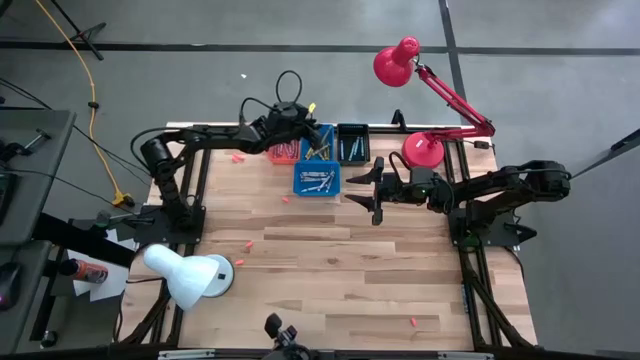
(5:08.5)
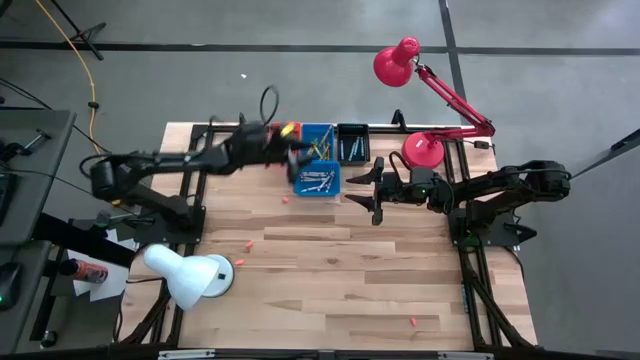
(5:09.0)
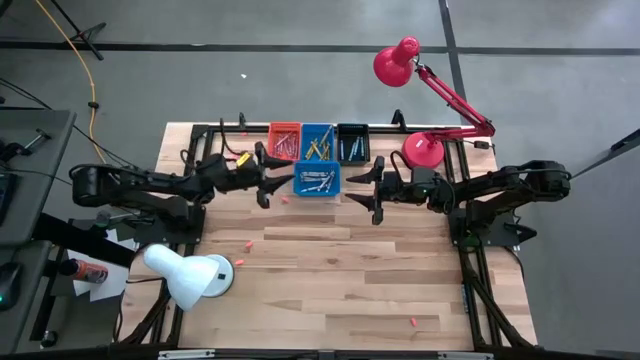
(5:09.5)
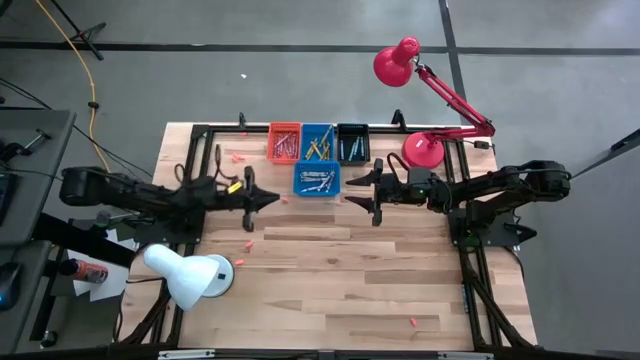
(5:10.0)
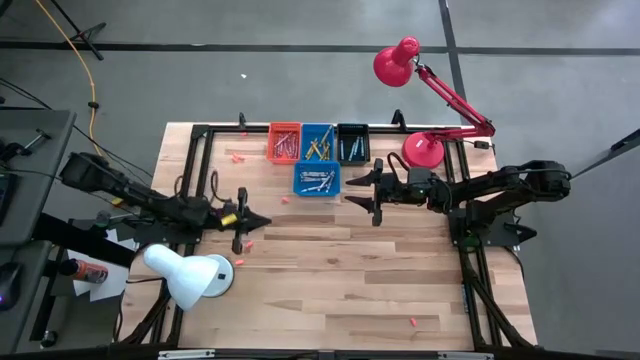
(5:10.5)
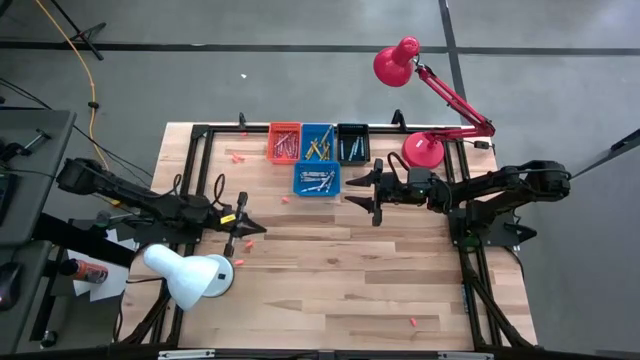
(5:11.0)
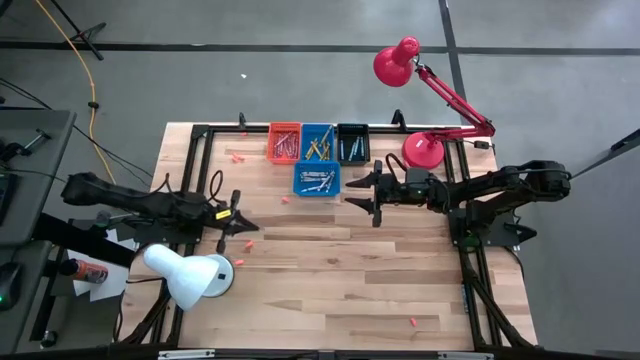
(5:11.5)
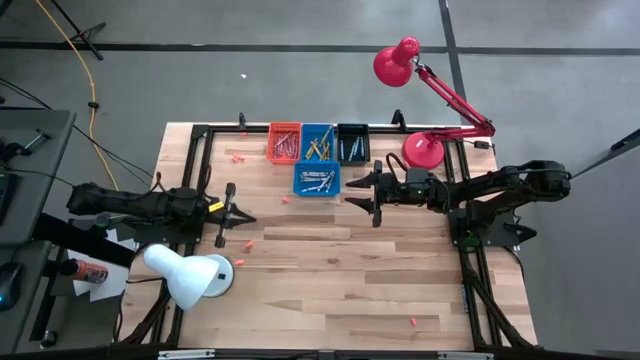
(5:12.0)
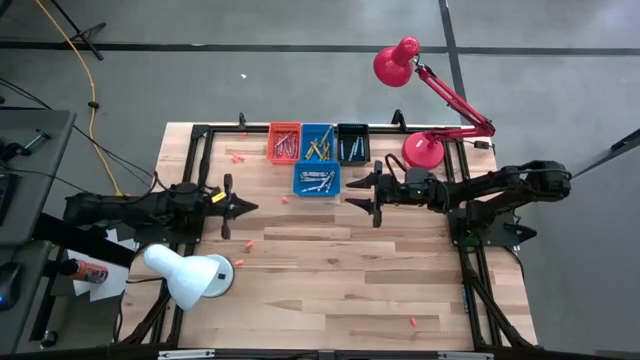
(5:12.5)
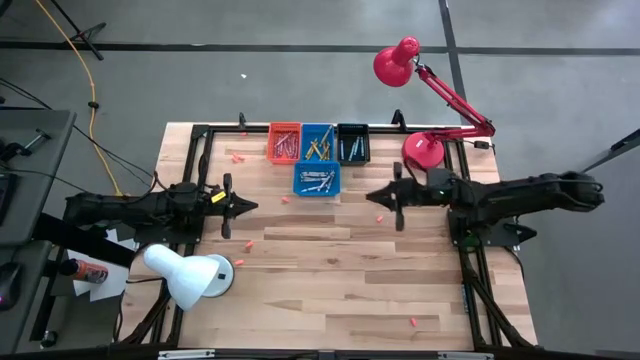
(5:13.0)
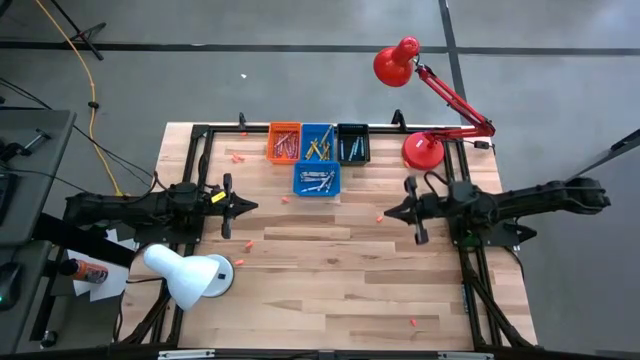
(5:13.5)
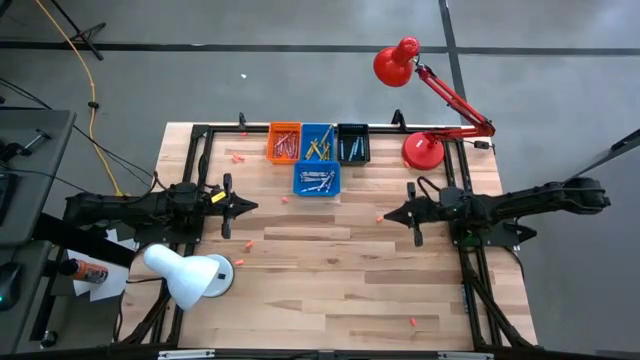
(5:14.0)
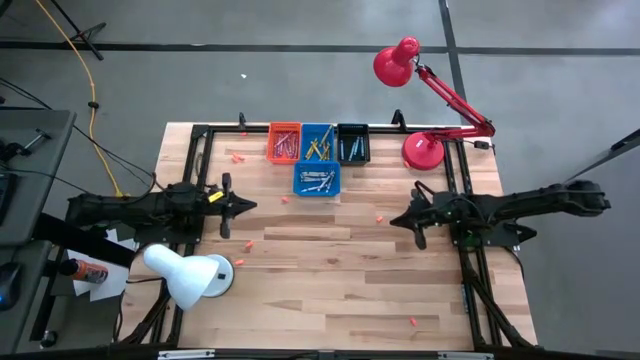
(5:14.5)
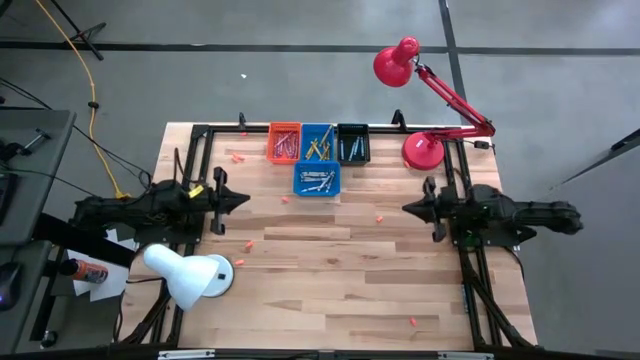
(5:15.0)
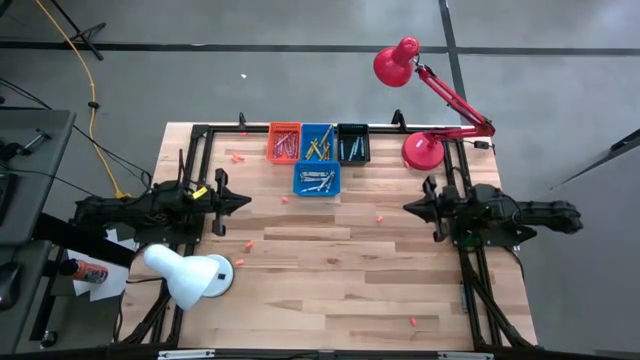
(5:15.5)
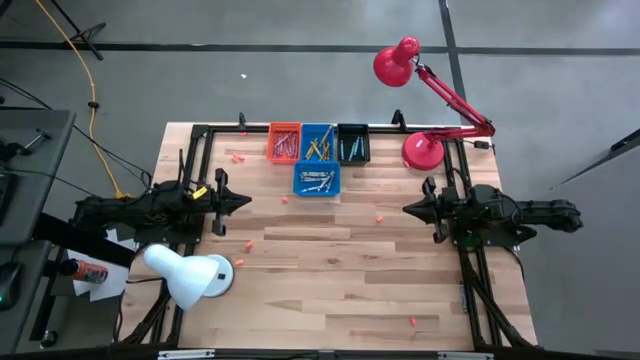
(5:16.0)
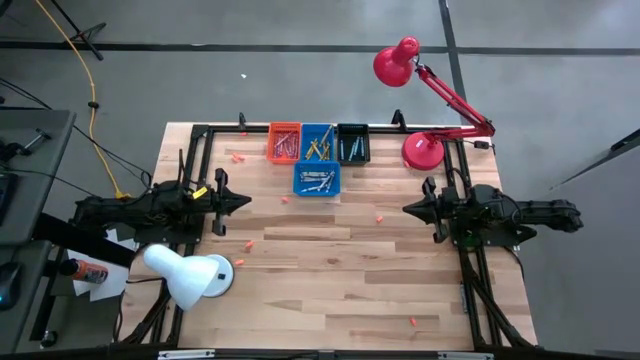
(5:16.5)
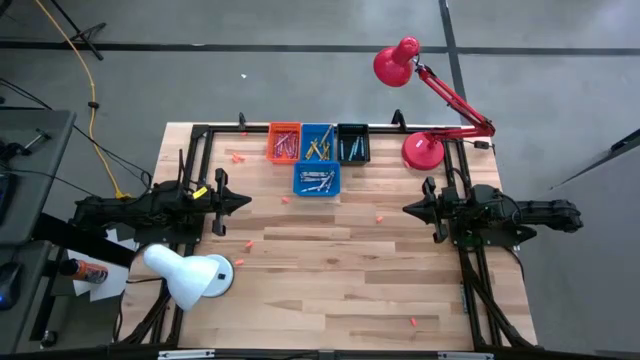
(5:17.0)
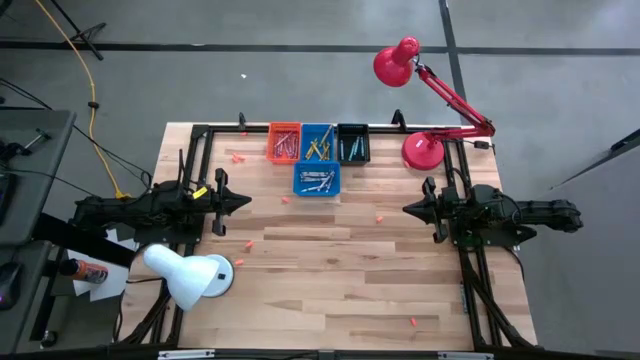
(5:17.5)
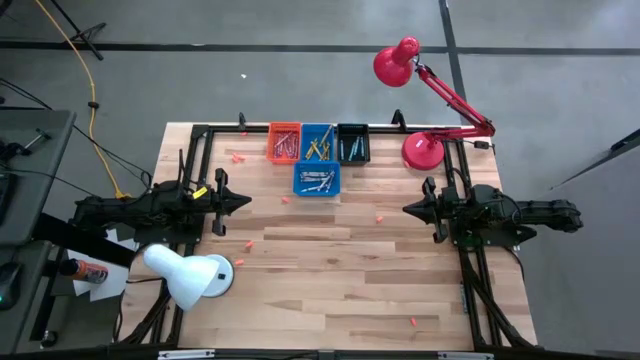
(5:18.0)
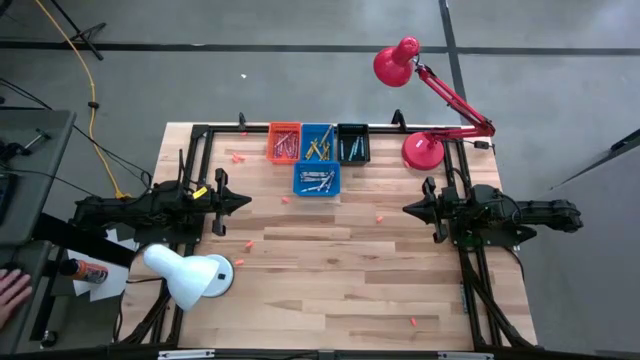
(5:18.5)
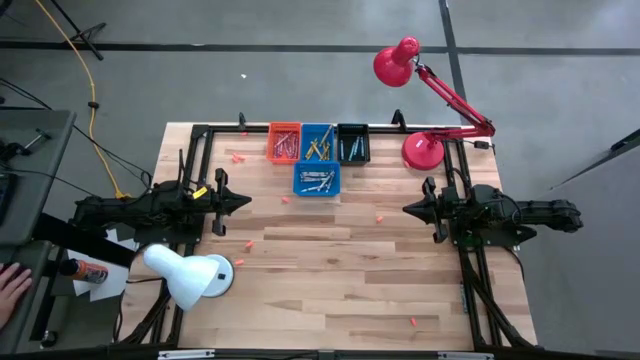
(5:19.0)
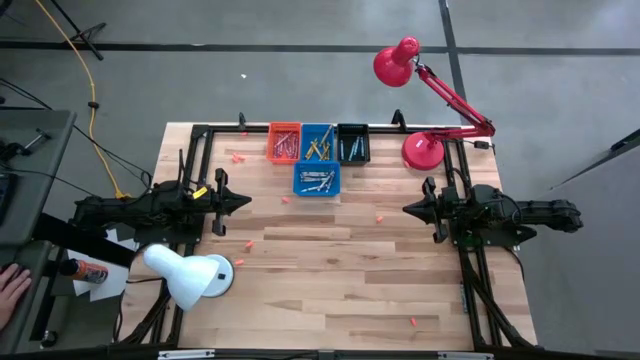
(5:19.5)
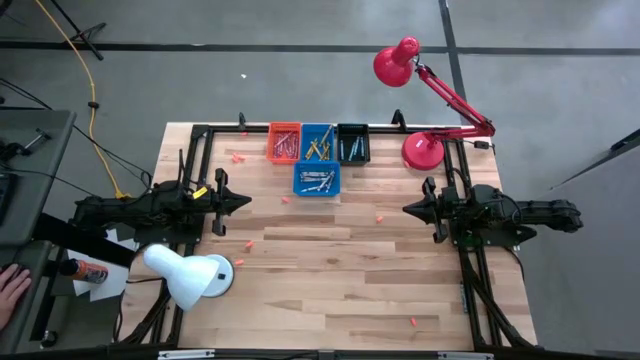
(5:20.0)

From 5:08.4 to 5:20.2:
Task: Sort crayons
Return to Home Position

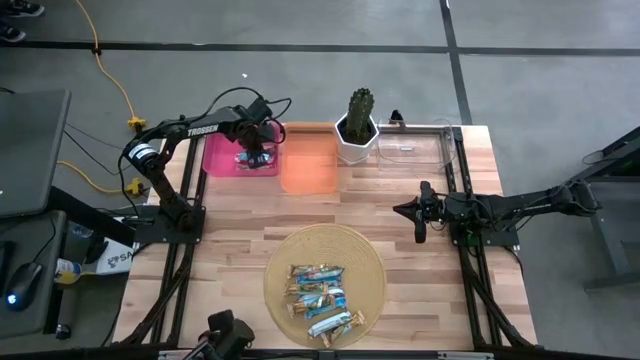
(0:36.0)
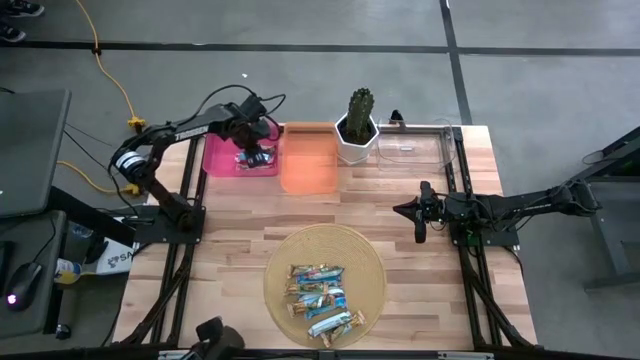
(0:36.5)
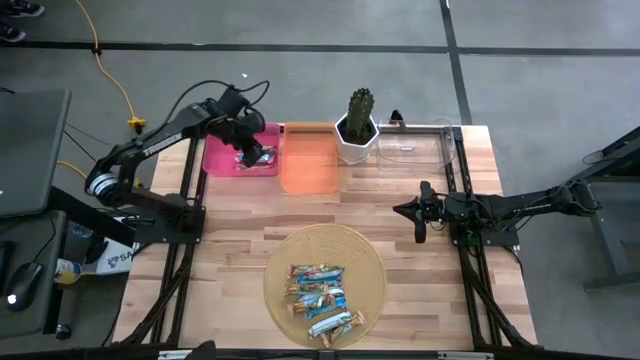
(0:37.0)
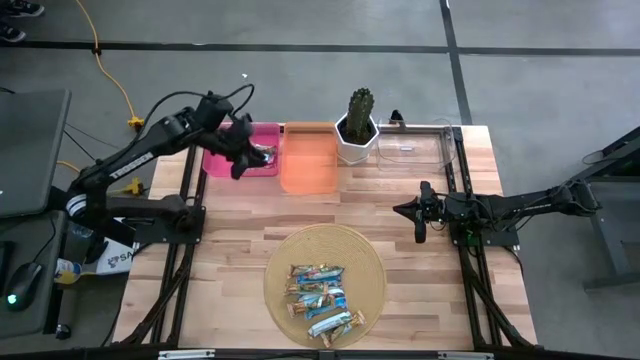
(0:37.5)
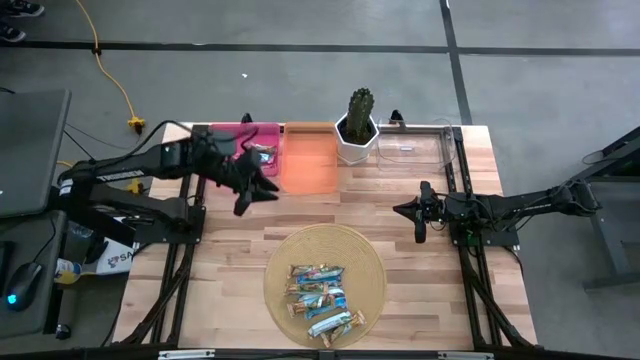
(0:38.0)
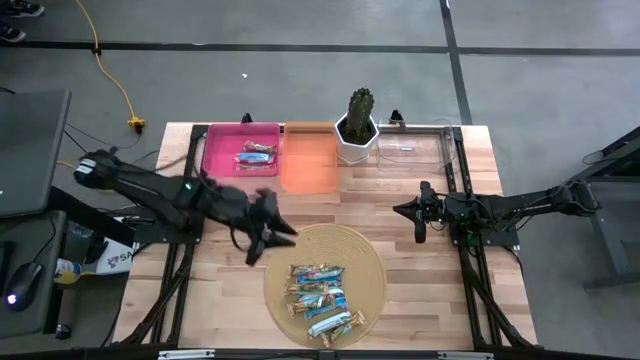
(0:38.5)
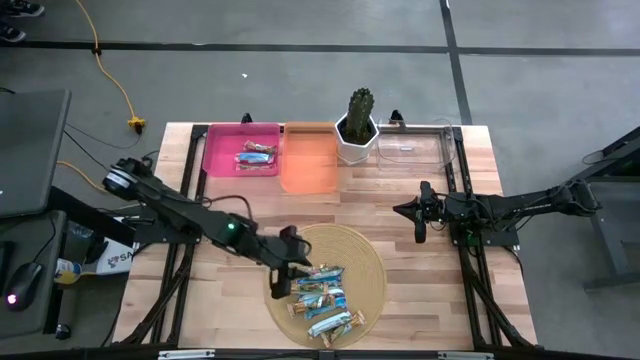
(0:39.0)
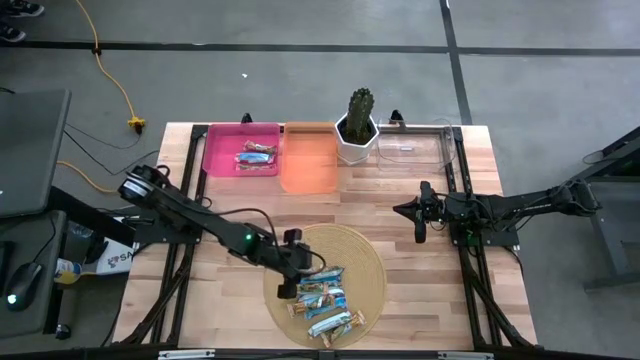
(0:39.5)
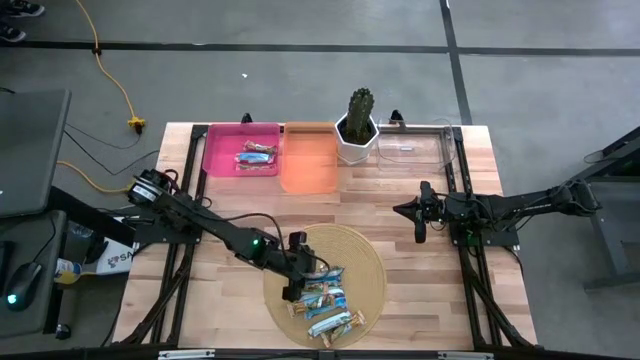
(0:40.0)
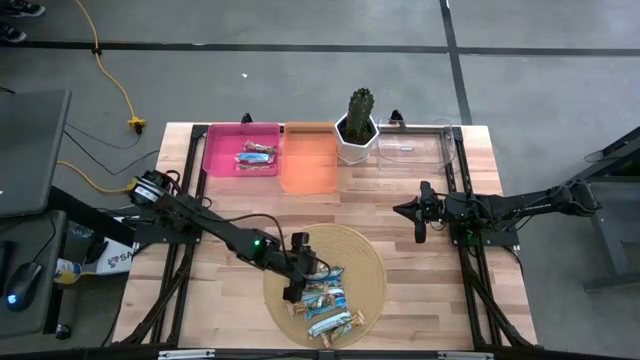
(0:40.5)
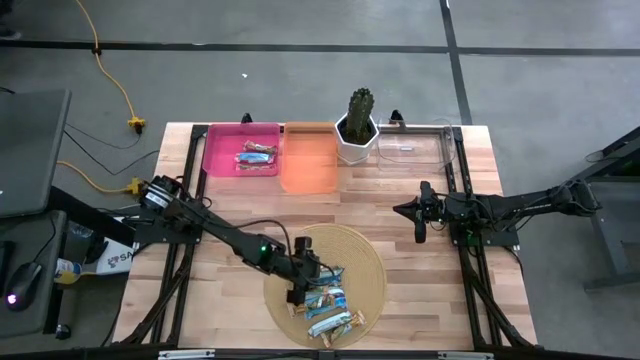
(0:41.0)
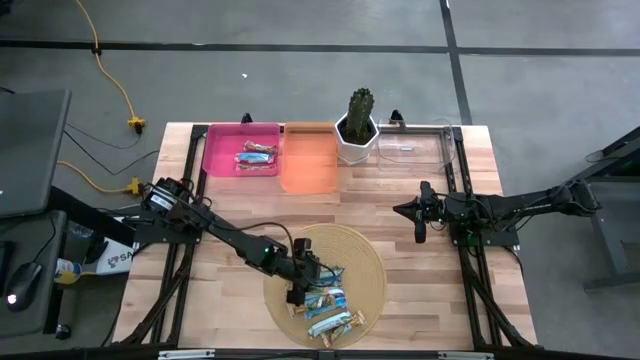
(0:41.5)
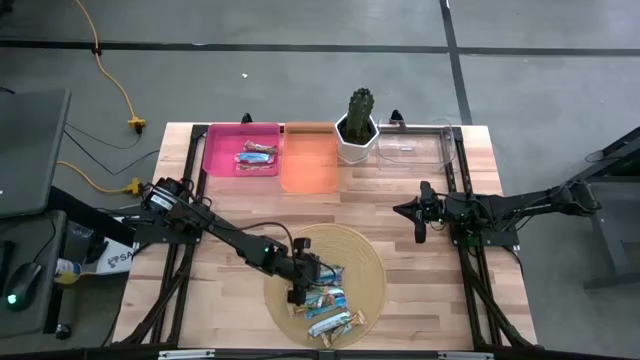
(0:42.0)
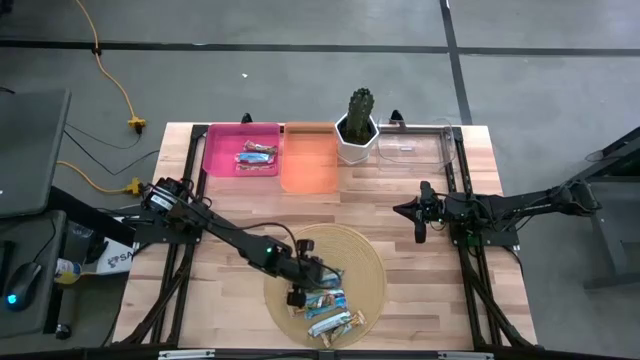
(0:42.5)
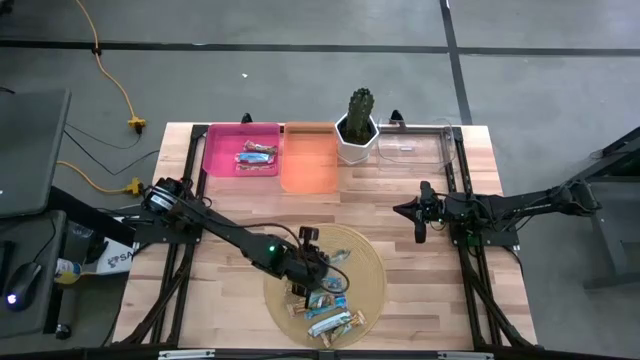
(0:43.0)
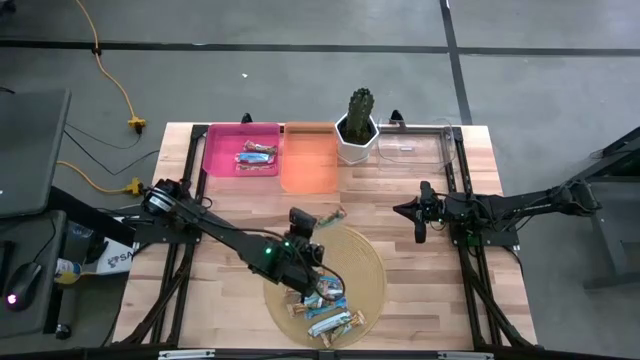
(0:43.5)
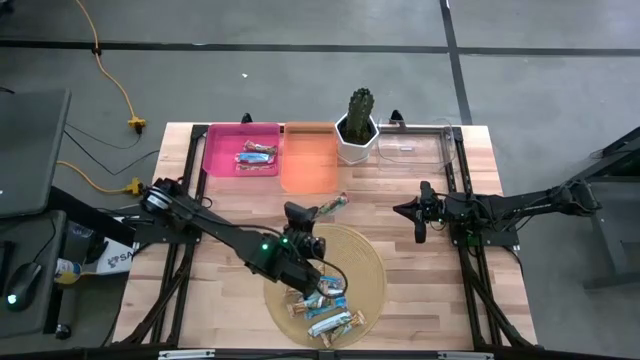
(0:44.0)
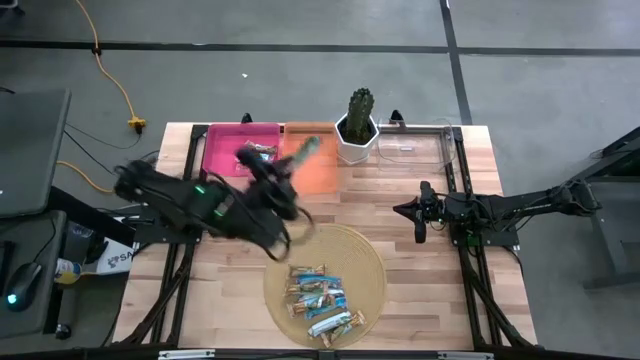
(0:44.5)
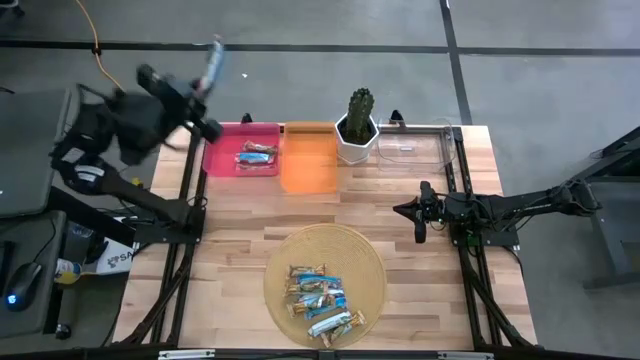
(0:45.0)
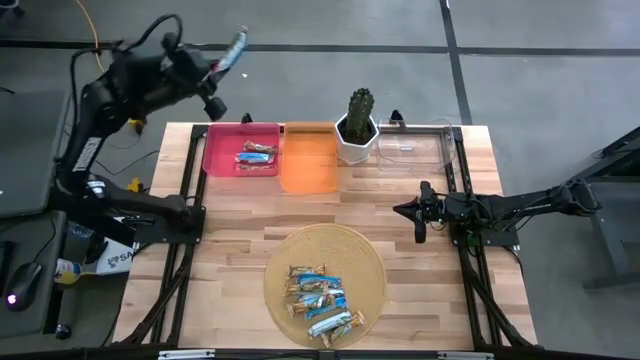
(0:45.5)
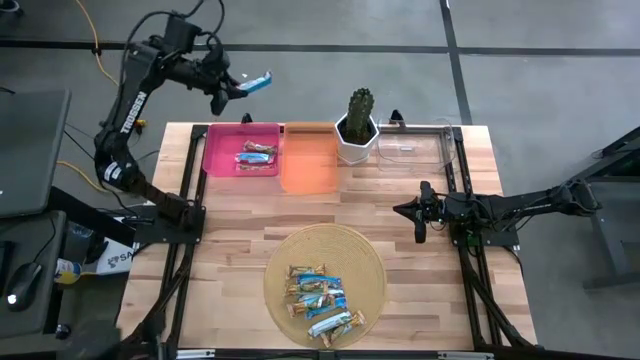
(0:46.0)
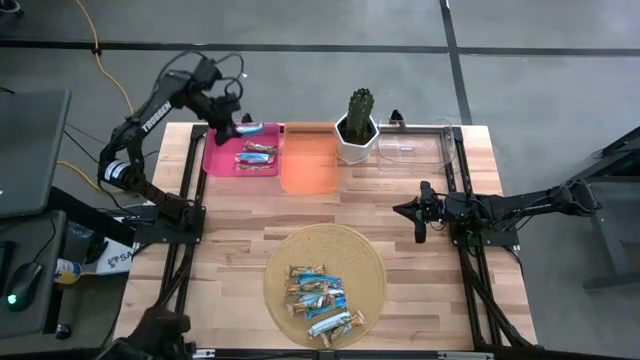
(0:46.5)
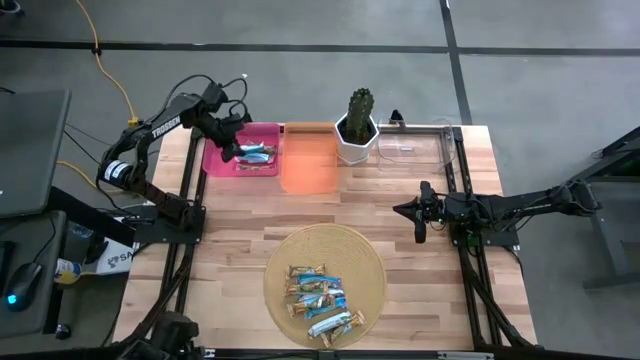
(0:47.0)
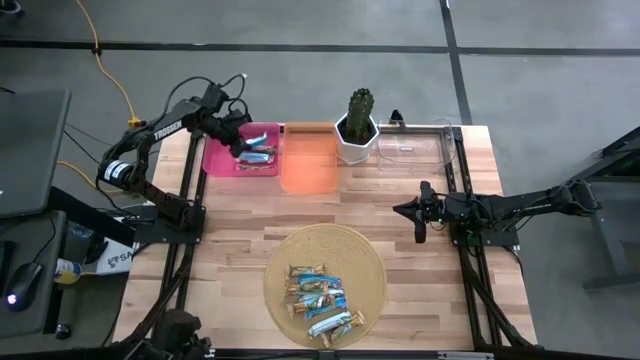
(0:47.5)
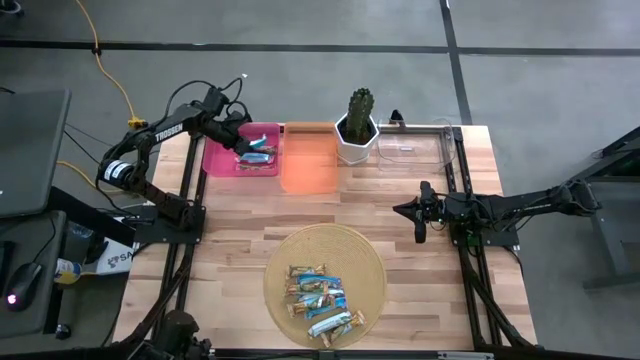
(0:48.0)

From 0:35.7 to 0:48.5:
Task: Pick and place Granola Bars by type
Put the red granola bar into the pink bin
